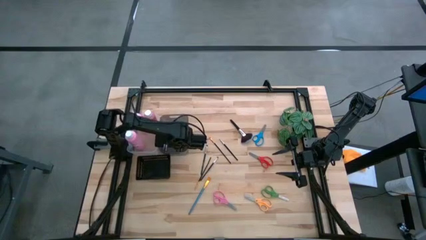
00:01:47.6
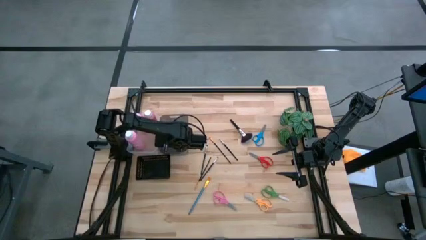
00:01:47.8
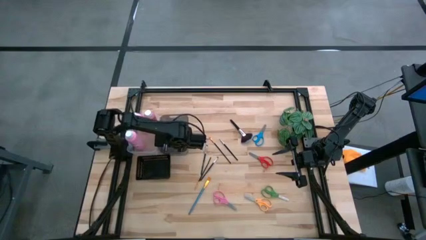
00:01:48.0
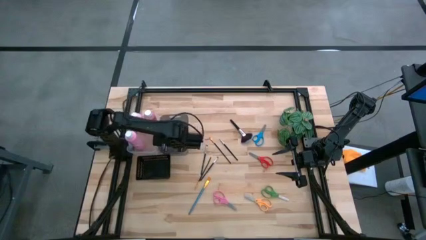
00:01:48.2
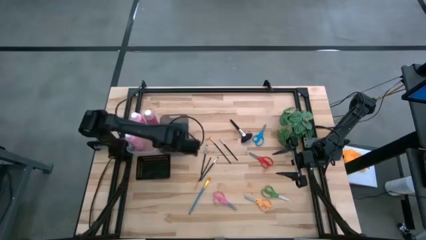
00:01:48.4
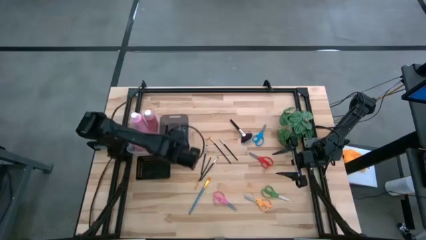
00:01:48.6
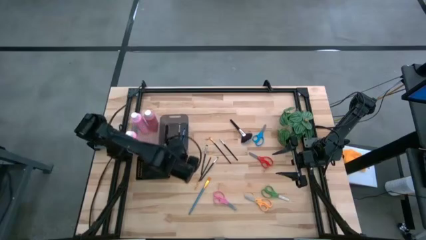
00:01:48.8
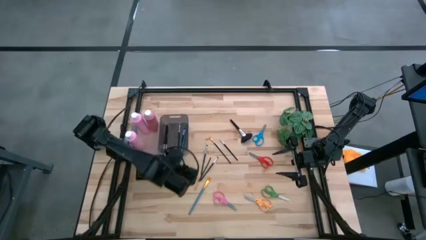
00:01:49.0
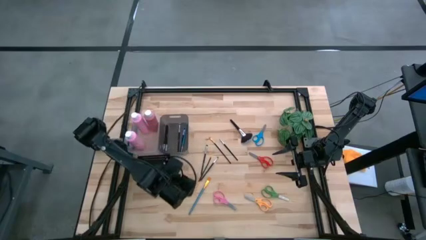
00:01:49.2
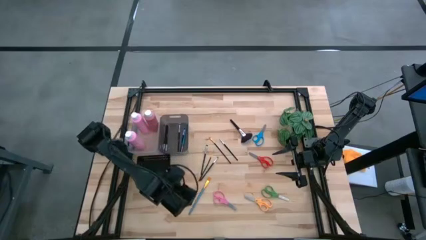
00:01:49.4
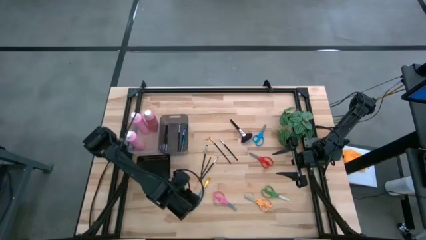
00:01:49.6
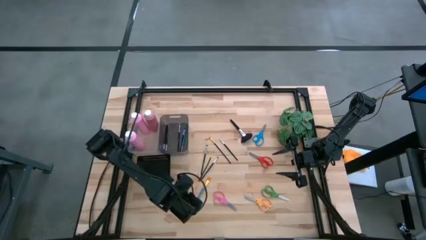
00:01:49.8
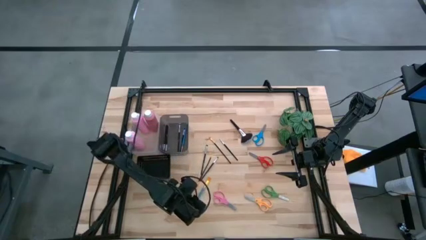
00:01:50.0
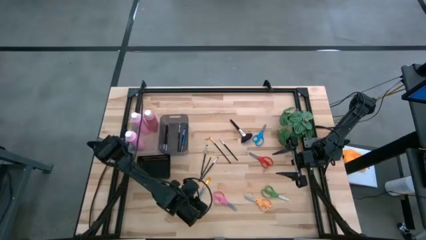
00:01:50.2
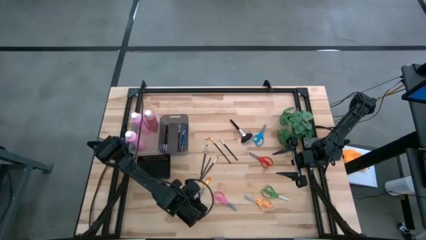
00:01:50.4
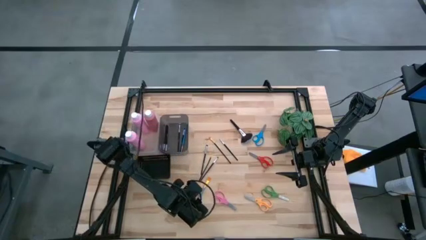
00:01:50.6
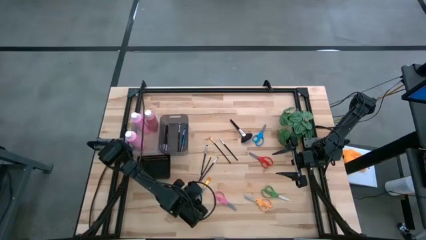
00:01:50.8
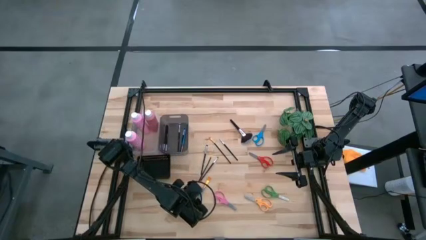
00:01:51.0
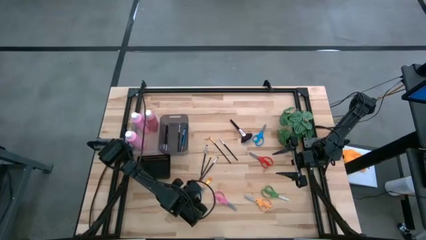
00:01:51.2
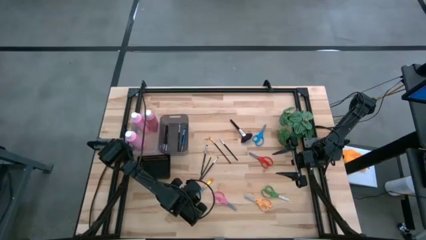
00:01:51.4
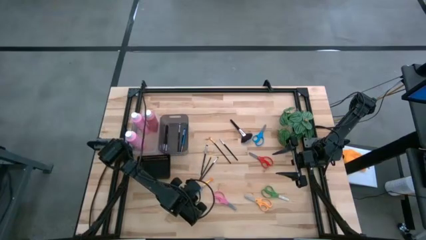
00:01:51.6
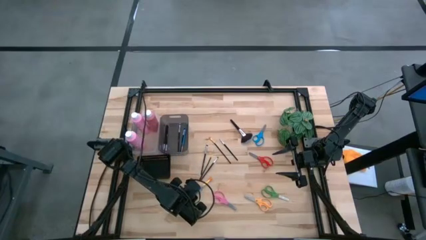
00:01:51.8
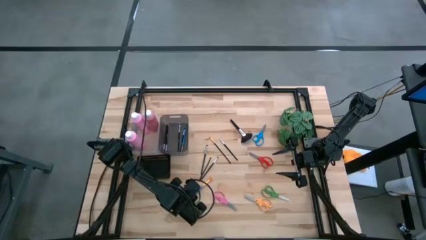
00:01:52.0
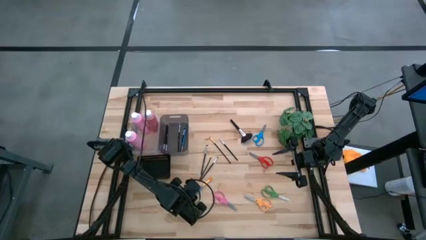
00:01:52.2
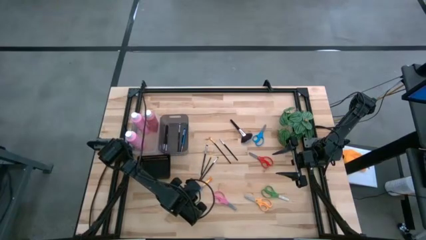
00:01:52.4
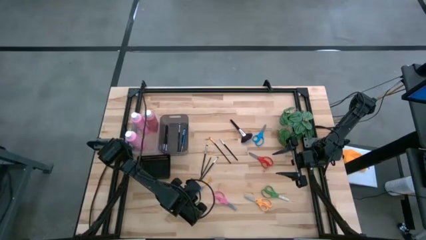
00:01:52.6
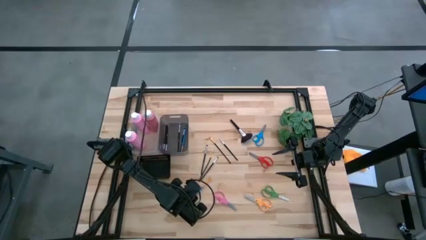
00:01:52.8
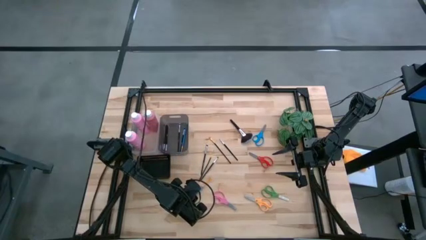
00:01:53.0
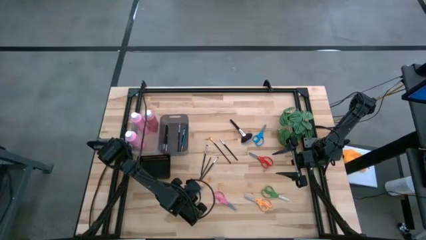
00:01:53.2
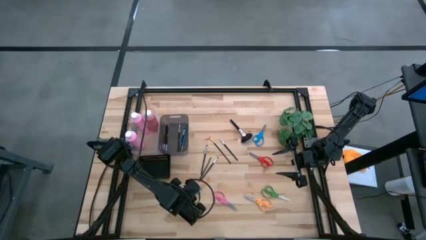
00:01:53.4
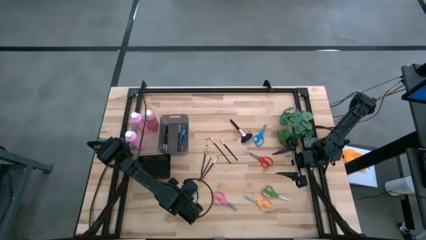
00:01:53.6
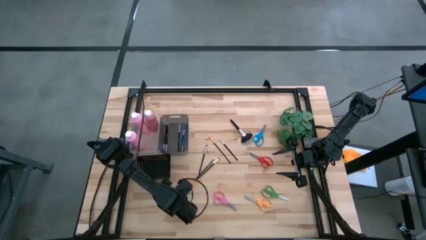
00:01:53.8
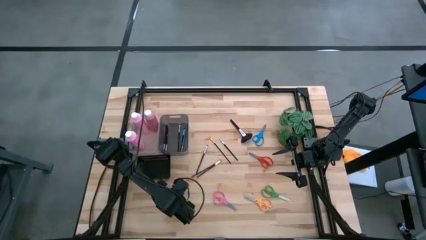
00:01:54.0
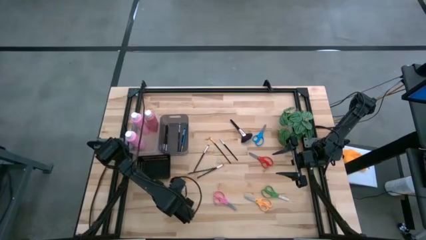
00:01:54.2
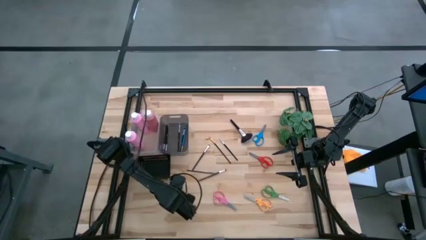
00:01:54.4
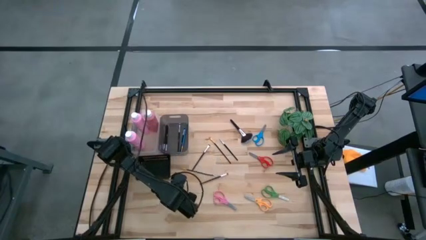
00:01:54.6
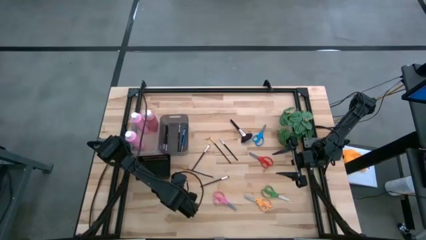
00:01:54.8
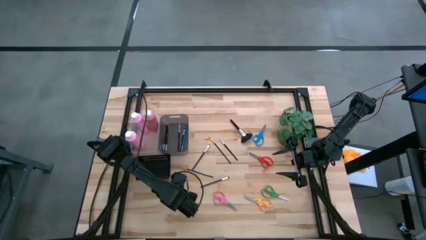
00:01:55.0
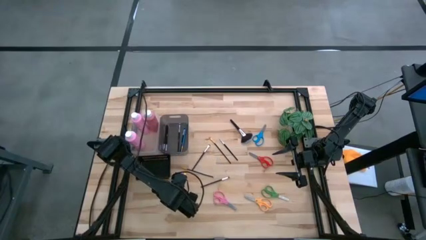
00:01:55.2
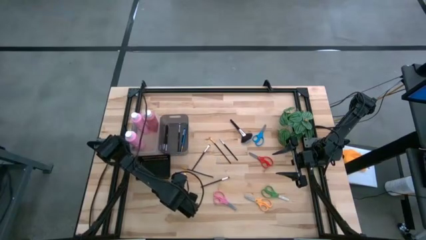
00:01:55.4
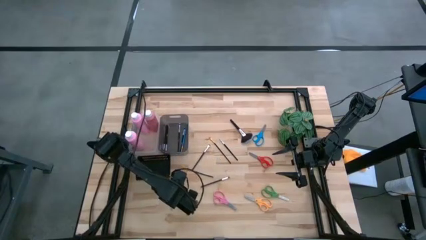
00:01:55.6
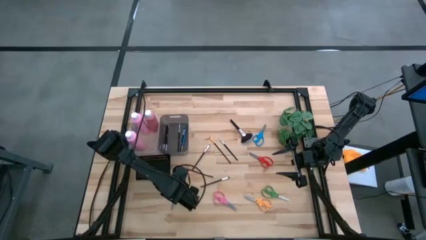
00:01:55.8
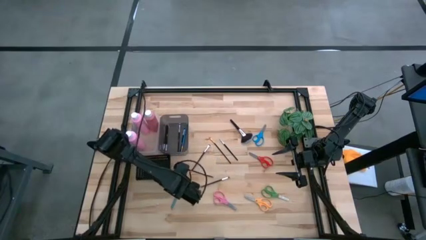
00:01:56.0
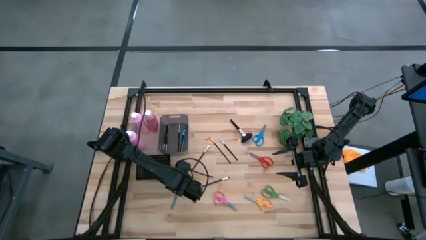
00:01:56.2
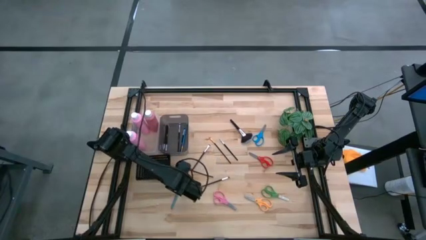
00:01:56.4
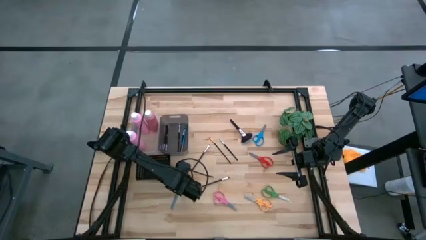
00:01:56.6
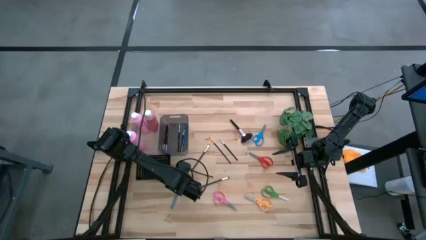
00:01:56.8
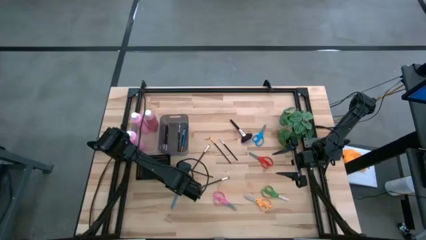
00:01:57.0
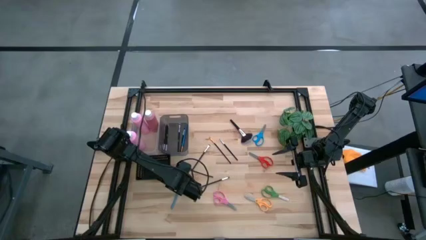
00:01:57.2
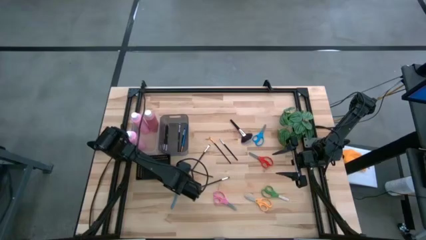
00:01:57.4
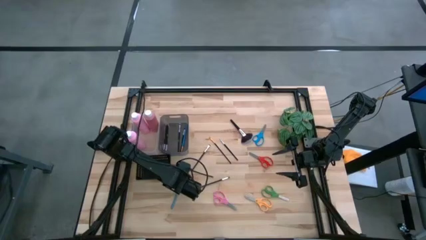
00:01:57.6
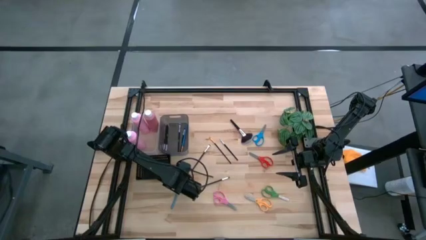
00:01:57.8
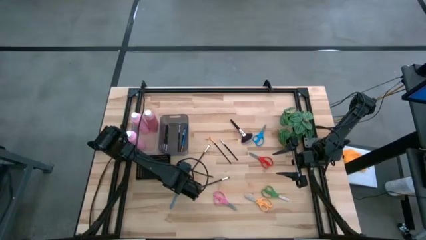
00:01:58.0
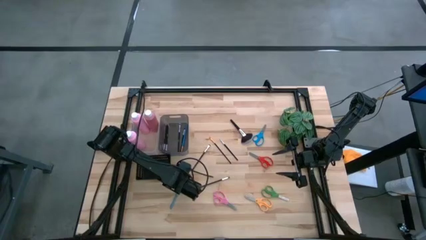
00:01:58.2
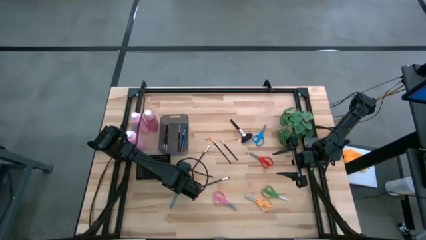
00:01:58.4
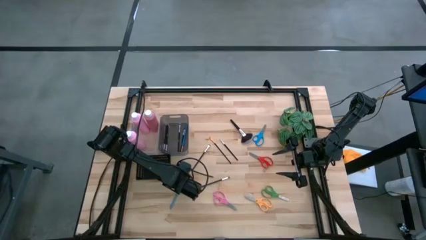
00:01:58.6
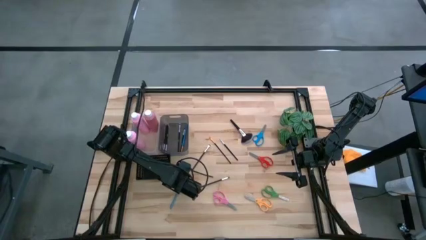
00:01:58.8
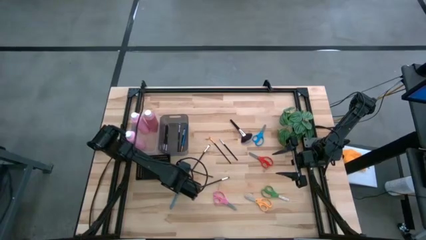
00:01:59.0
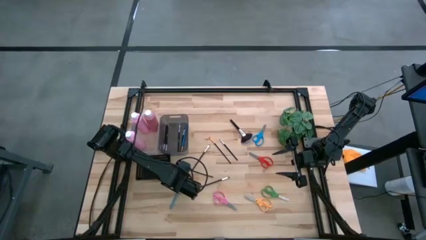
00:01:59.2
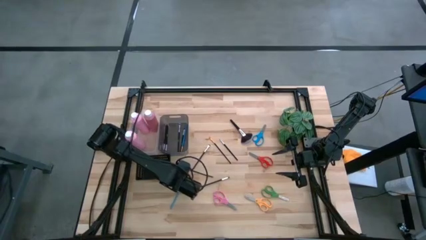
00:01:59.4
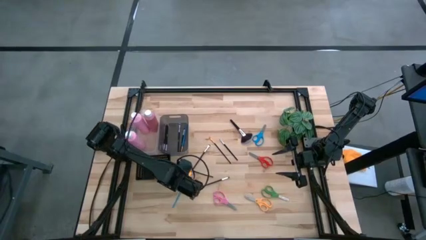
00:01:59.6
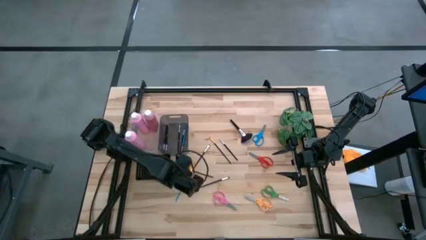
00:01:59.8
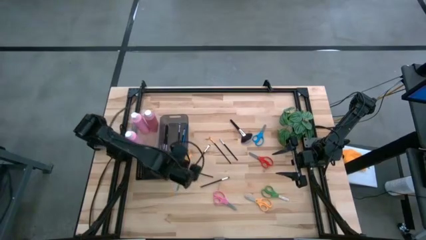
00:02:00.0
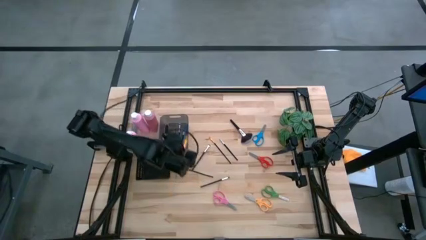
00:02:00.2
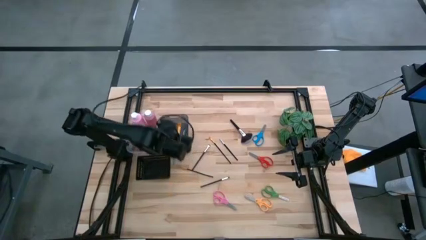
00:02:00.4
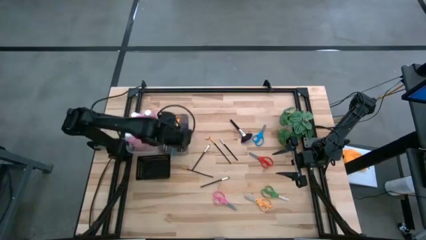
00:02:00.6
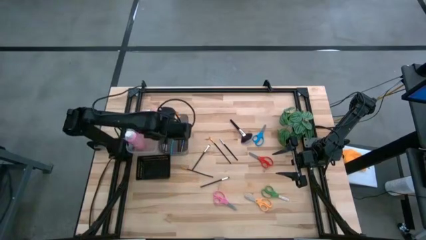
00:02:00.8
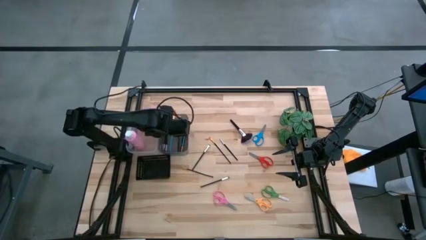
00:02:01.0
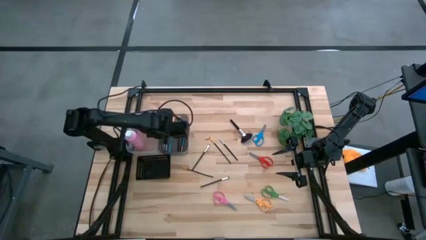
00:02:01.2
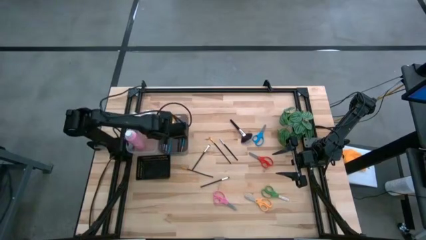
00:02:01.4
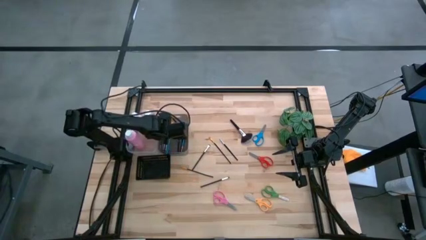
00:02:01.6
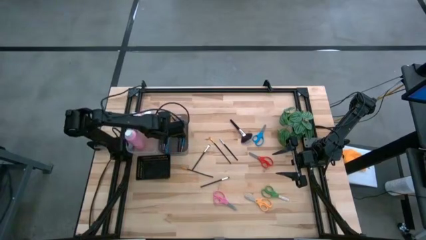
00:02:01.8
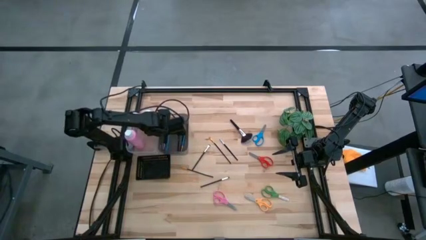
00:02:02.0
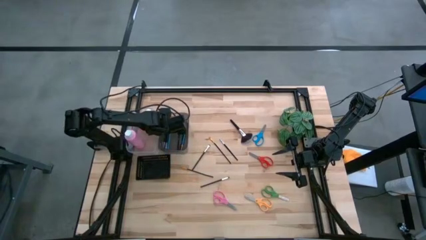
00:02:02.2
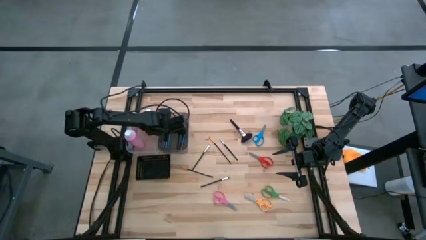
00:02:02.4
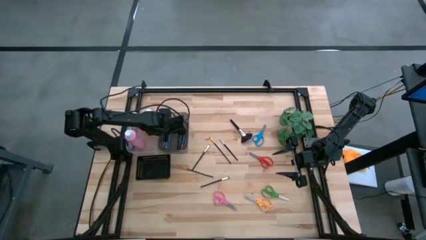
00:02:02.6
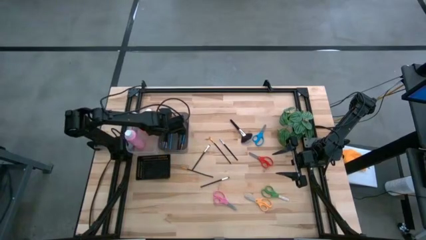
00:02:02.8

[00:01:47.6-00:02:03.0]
Task: Pick & Place Paint Supplies
Put the left blue brush into the black bin
